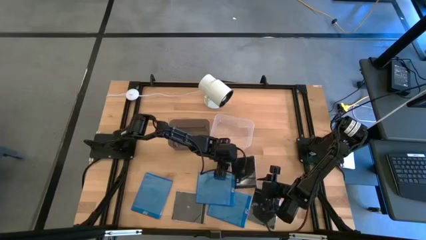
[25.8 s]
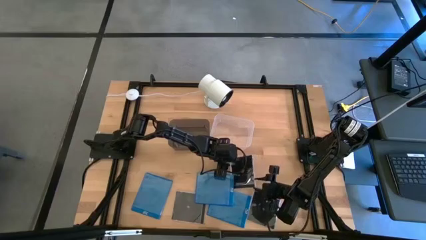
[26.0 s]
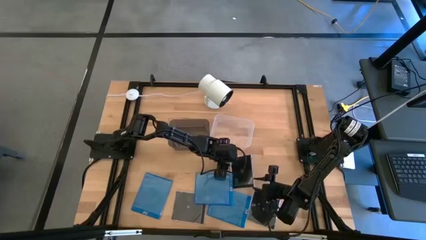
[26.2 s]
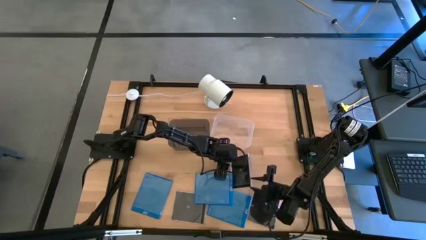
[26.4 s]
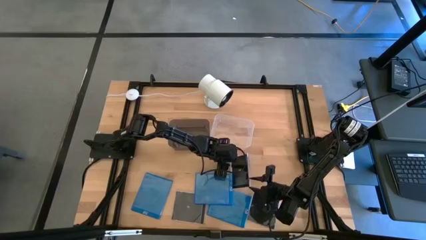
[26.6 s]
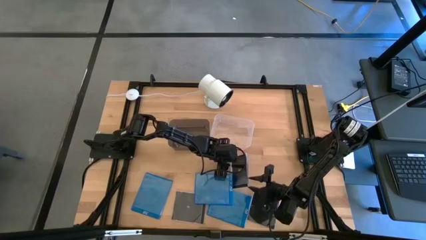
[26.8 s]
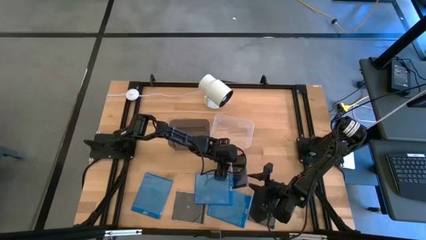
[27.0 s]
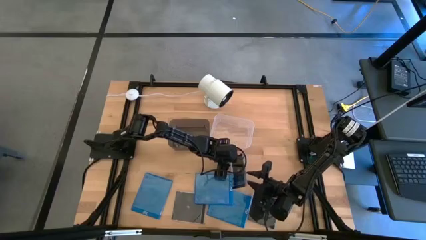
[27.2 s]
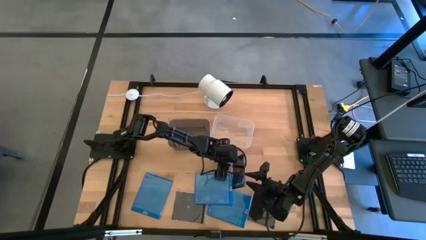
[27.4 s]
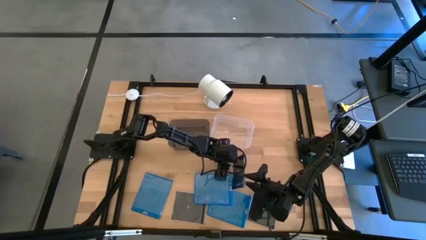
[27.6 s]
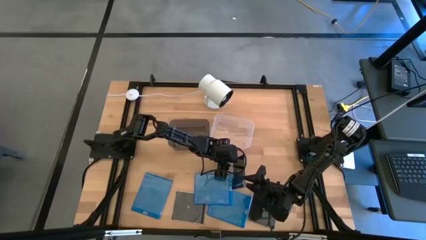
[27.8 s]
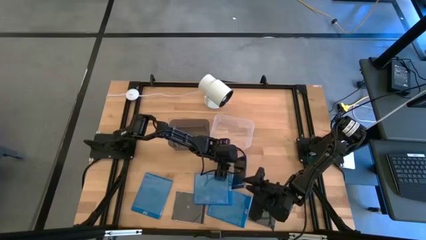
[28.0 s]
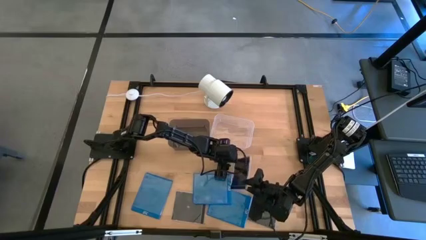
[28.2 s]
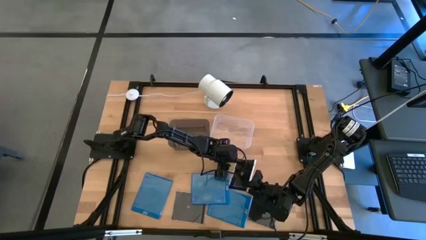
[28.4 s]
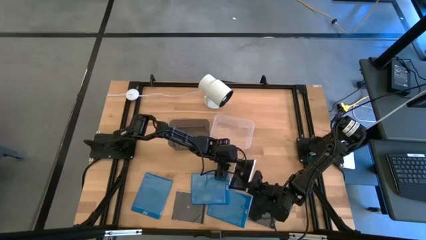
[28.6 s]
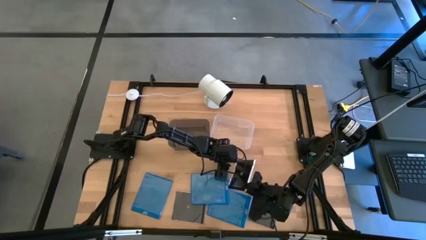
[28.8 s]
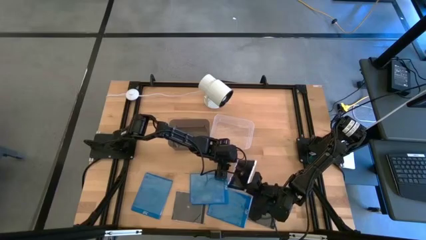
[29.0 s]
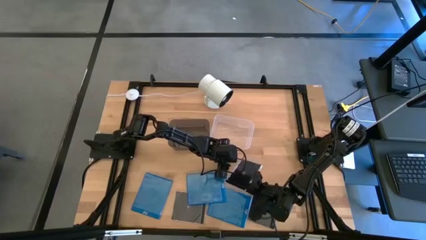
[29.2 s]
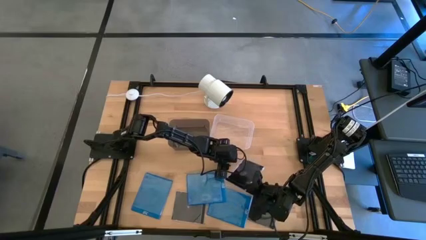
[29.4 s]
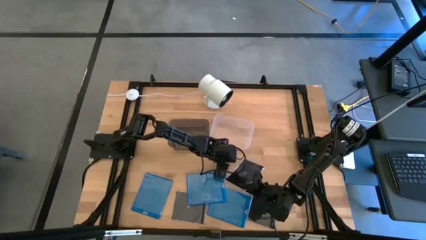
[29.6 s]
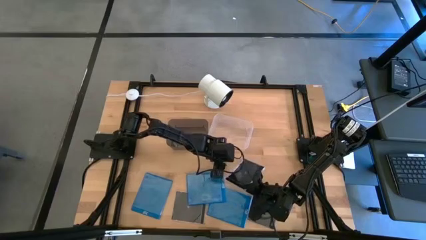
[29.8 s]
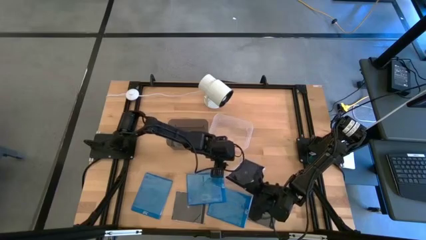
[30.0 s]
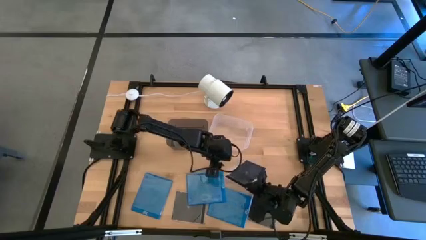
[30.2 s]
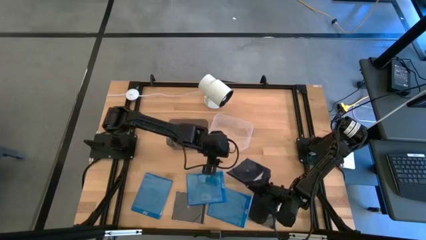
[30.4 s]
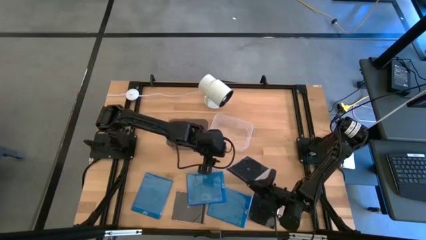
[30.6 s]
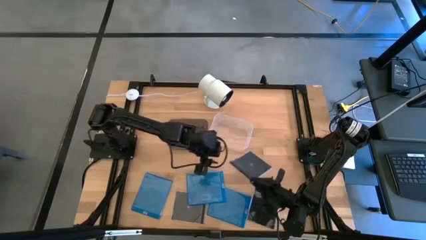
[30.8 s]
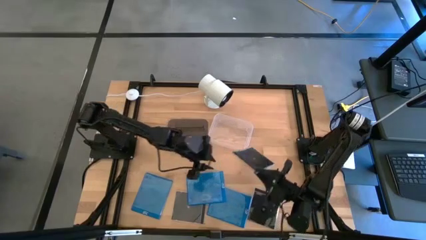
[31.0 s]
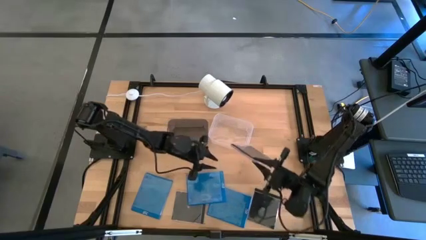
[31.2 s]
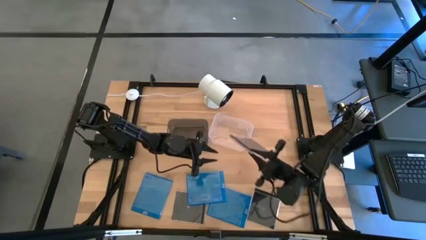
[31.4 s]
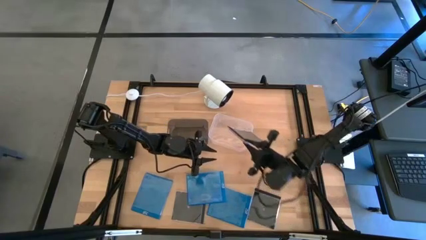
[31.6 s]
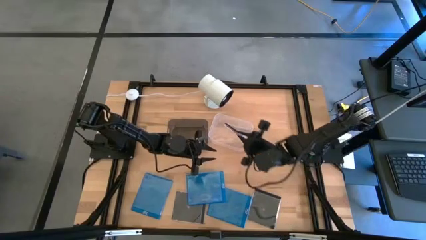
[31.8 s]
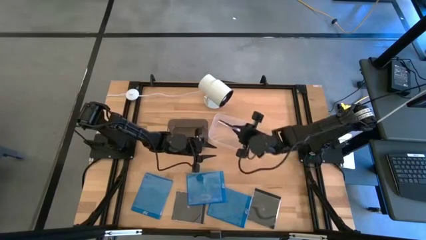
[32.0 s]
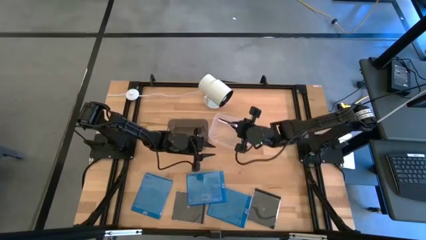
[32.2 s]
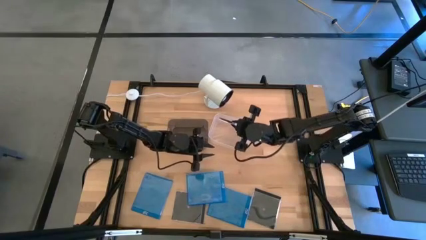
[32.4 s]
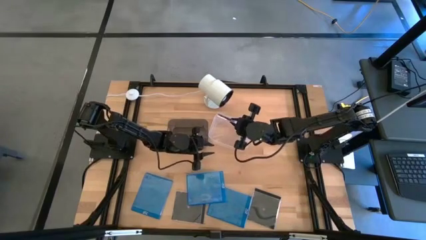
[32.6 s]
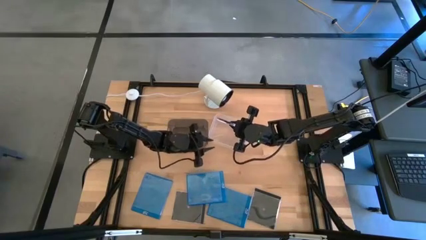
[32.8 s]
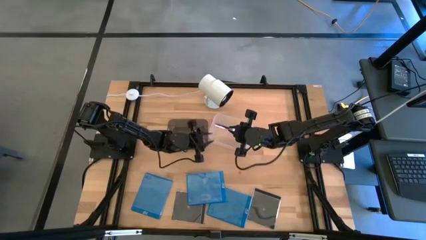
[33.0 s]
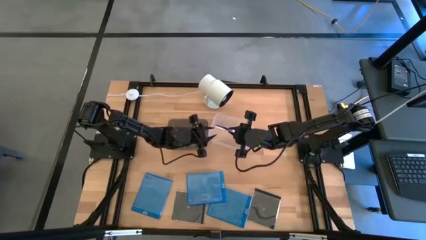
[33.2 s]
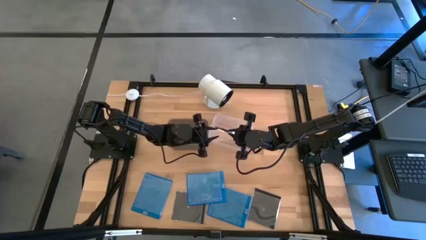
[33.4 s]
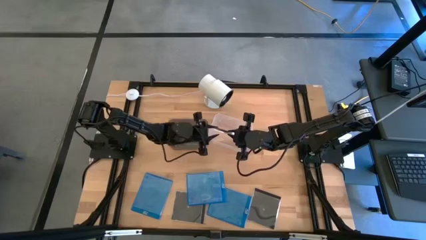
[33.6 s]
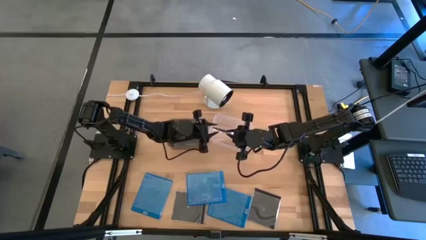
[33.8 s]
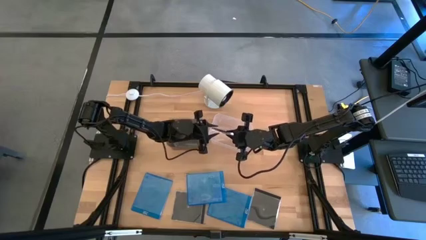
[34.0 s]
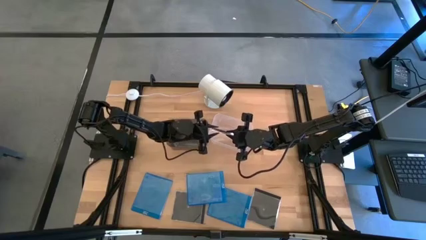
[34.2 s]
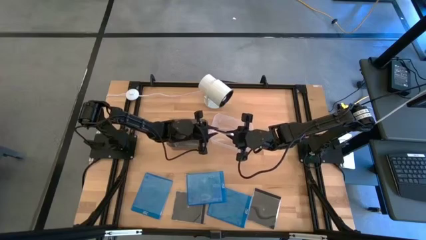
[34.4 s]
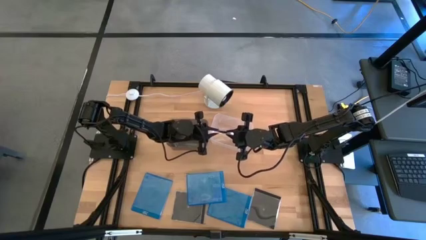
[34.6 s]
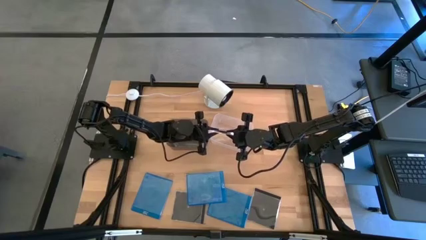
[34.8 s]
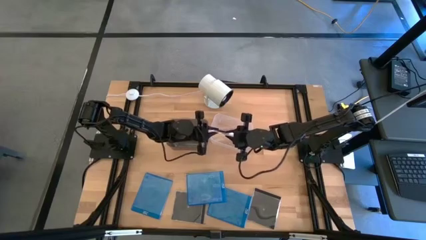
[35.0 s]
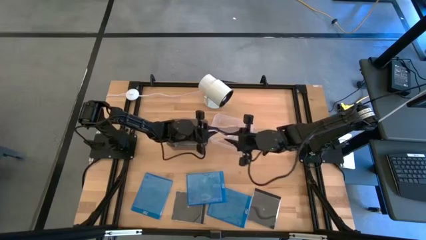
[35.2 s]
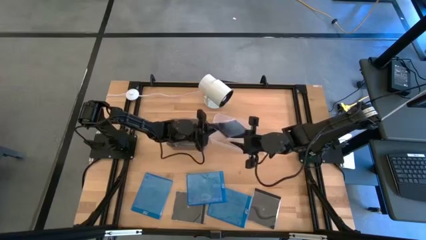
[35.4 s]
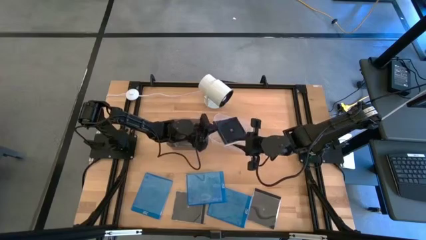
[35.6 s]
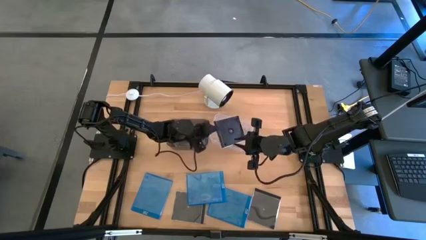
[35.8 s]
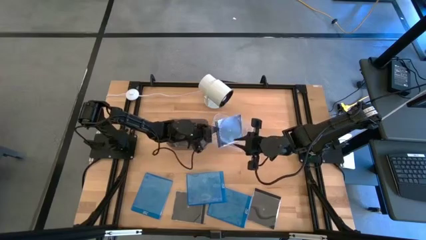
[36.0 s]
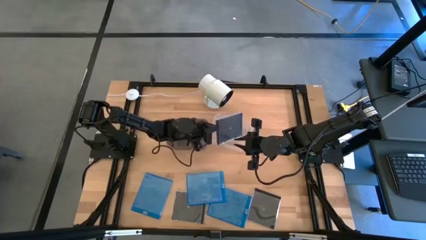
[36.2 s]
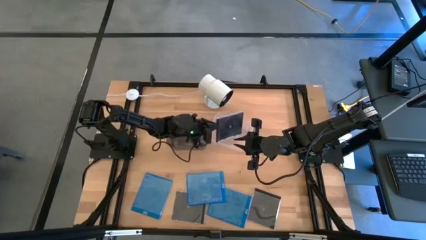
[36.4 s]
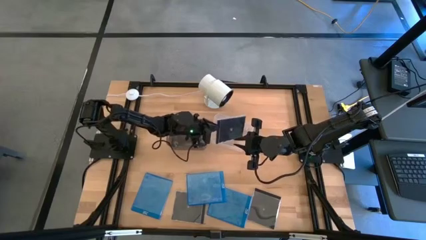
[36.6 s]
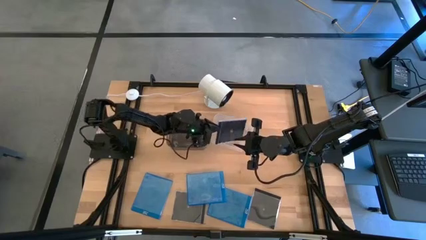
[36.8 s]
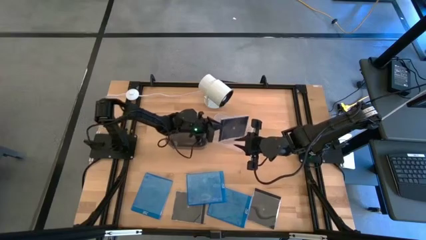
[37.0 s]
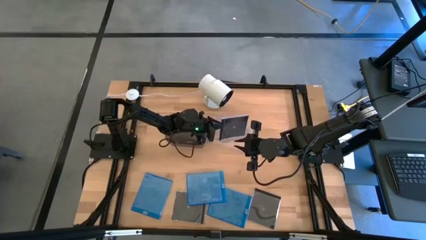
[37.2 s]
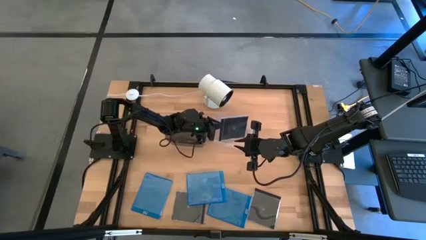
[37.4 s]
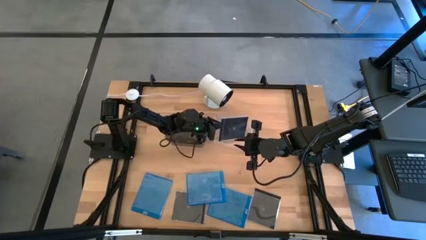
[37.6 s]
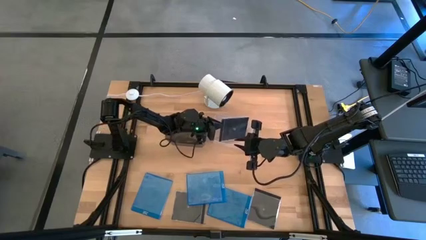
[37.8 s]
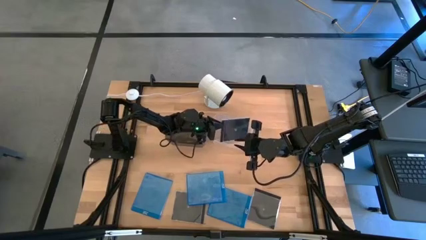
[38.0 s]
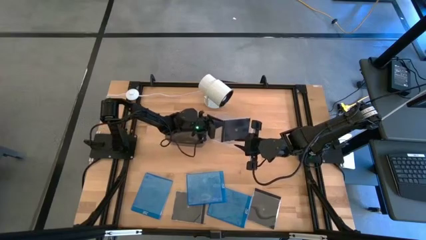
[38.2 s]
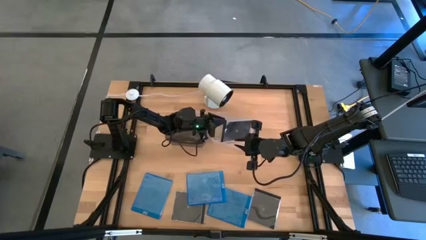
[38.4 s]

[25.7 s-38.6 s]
Task: Pick & place jewel cases by type
Put the top right black cd case into the transparent bin
